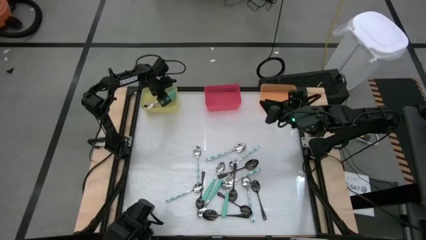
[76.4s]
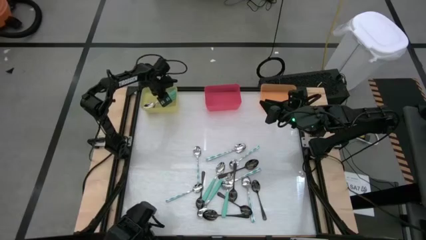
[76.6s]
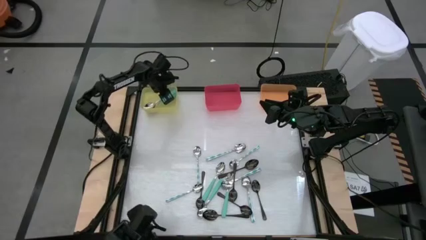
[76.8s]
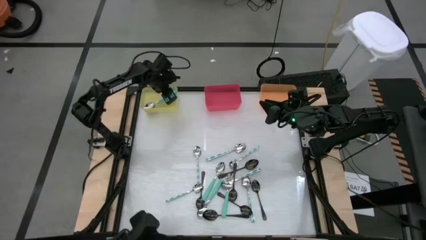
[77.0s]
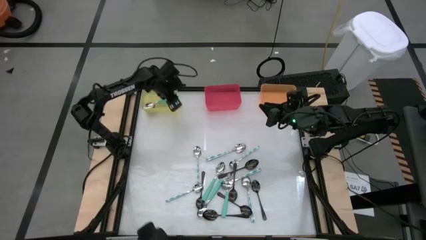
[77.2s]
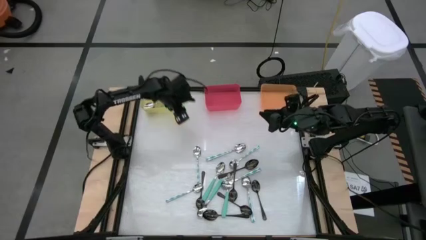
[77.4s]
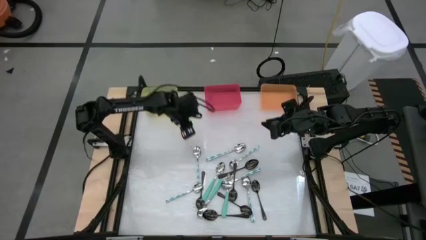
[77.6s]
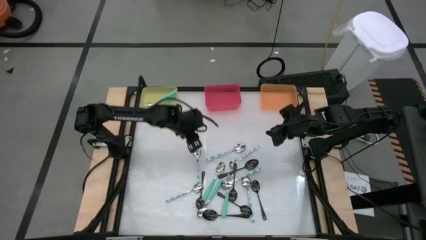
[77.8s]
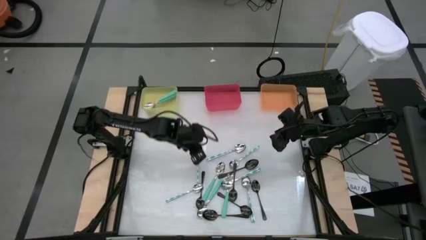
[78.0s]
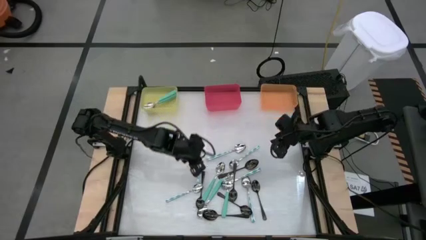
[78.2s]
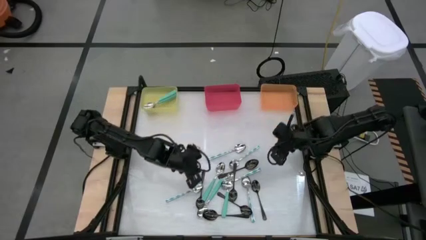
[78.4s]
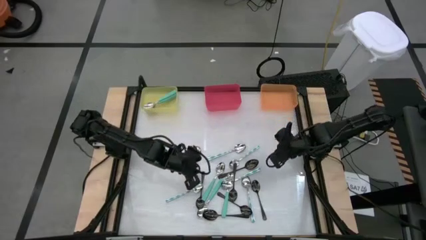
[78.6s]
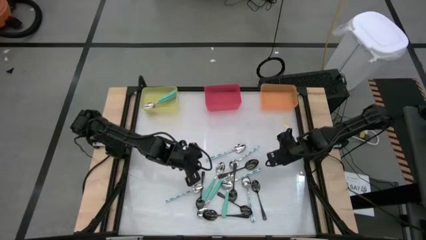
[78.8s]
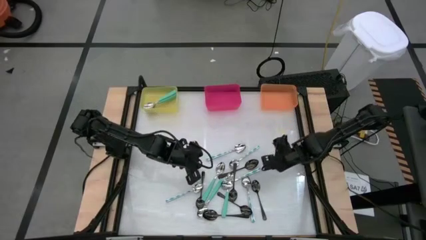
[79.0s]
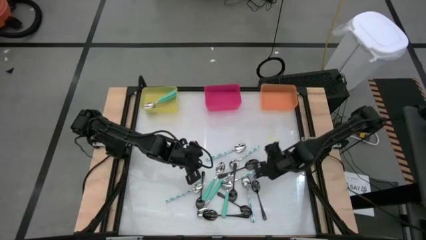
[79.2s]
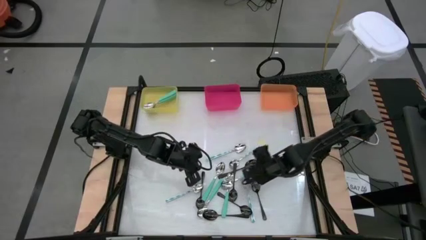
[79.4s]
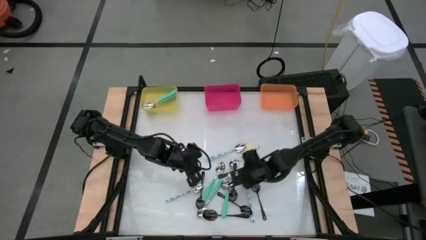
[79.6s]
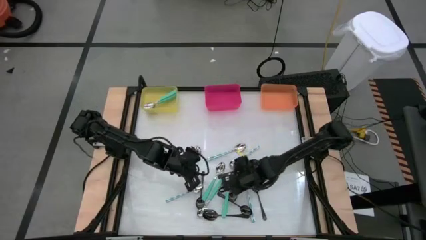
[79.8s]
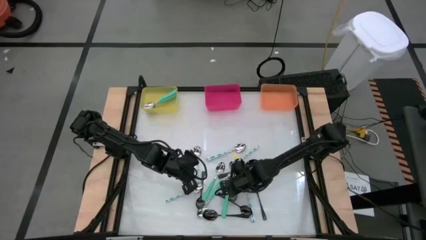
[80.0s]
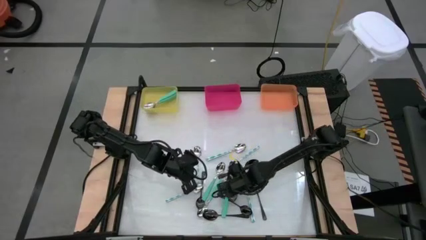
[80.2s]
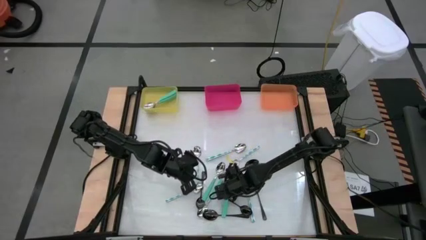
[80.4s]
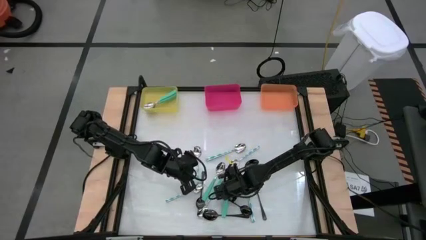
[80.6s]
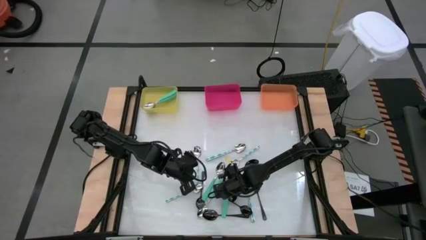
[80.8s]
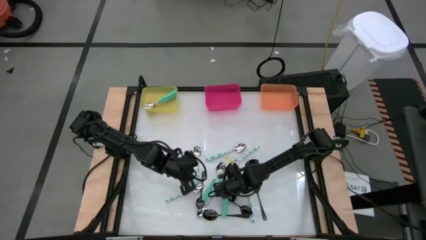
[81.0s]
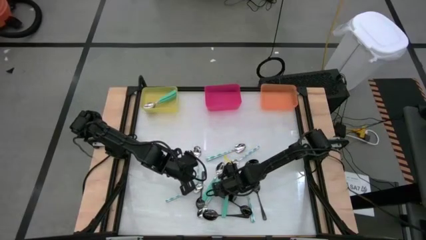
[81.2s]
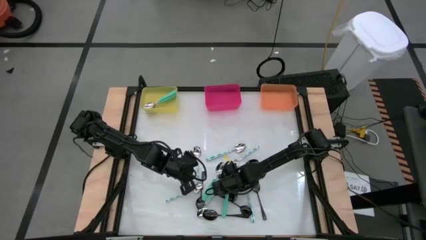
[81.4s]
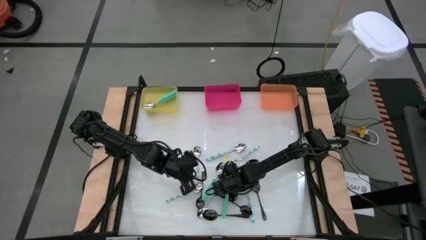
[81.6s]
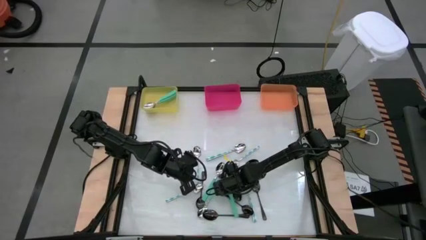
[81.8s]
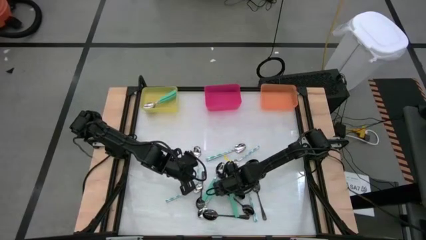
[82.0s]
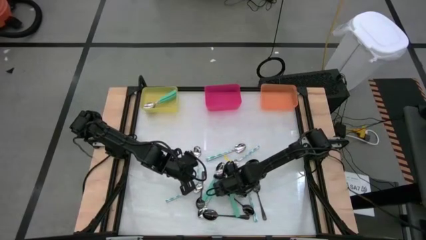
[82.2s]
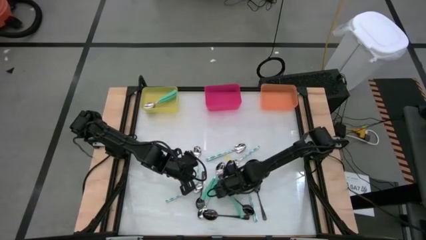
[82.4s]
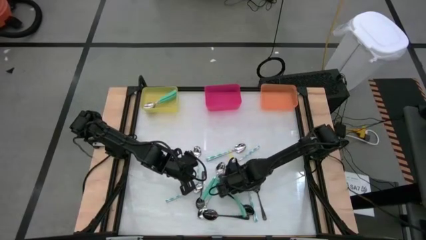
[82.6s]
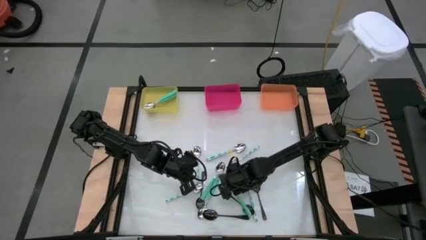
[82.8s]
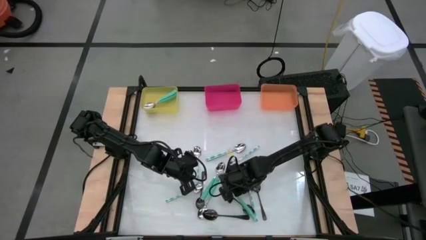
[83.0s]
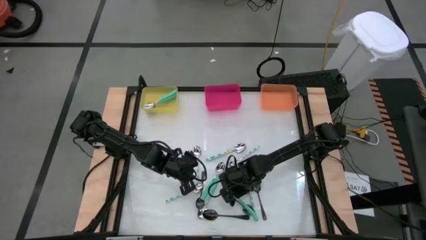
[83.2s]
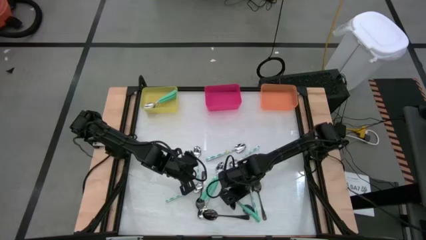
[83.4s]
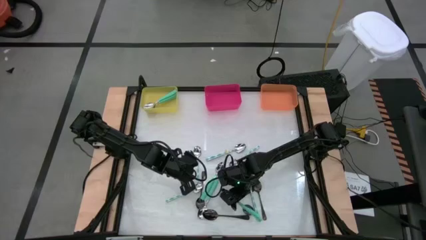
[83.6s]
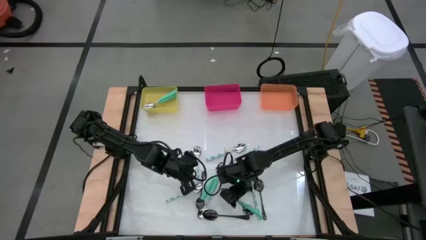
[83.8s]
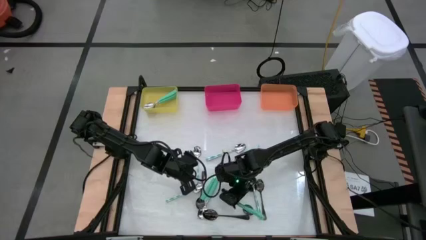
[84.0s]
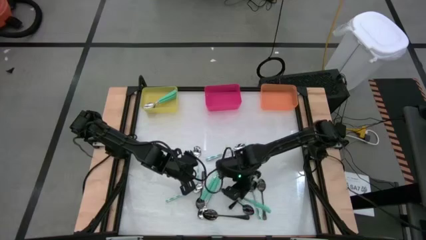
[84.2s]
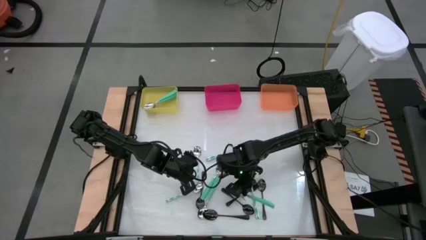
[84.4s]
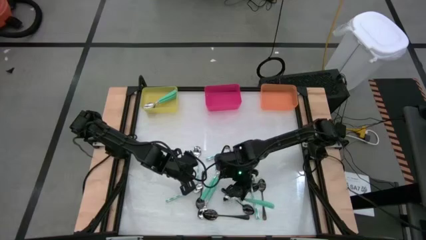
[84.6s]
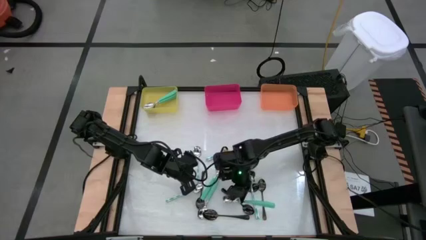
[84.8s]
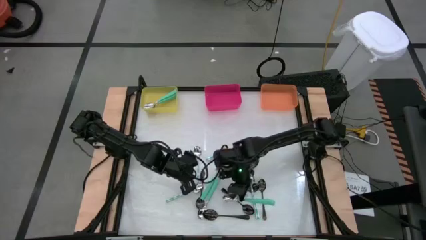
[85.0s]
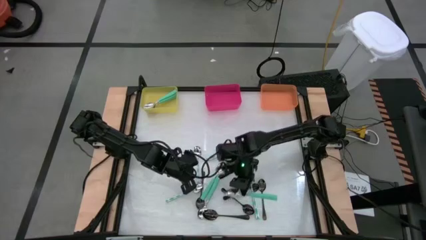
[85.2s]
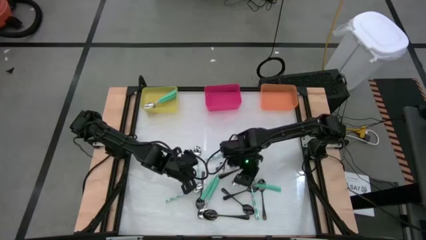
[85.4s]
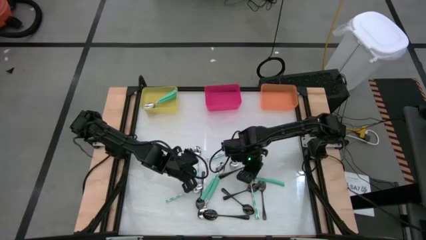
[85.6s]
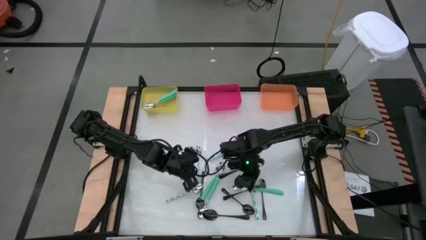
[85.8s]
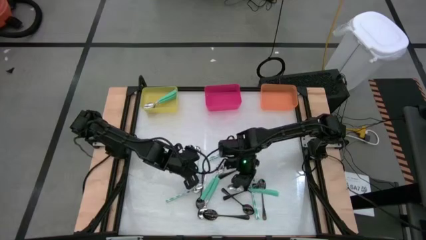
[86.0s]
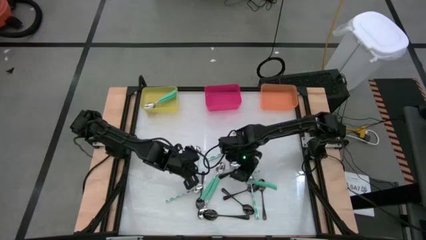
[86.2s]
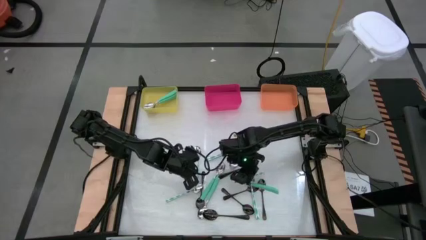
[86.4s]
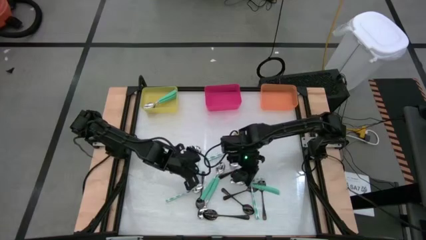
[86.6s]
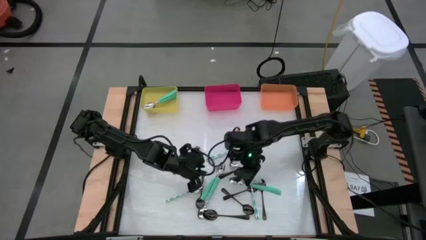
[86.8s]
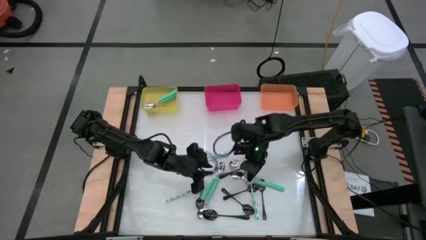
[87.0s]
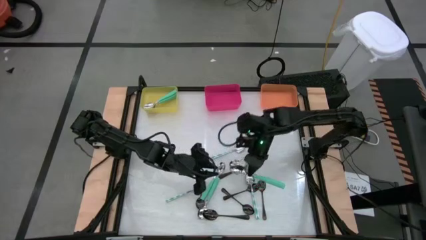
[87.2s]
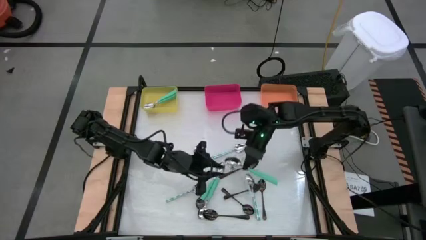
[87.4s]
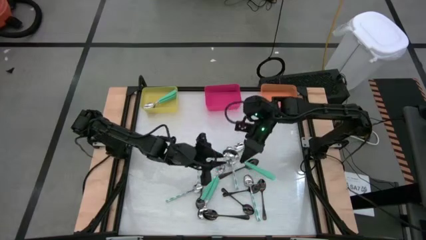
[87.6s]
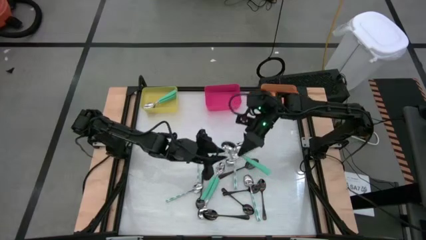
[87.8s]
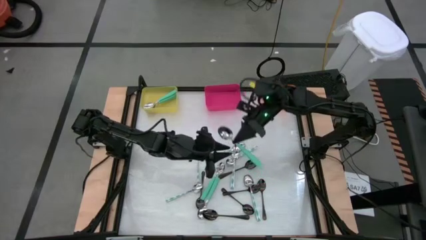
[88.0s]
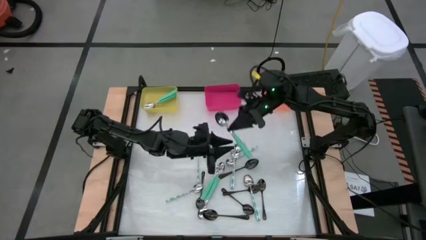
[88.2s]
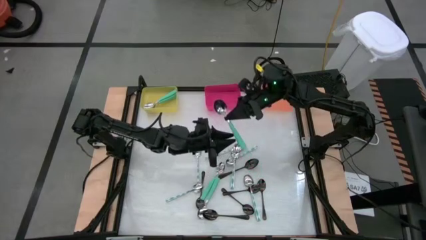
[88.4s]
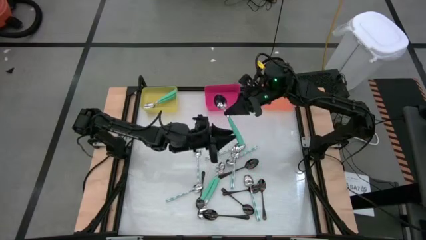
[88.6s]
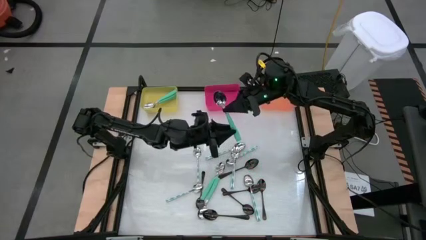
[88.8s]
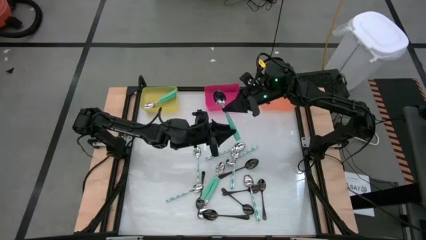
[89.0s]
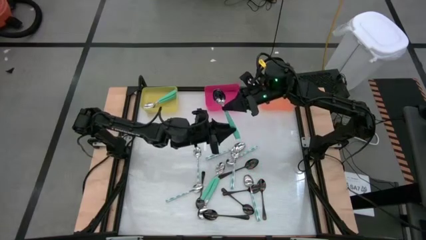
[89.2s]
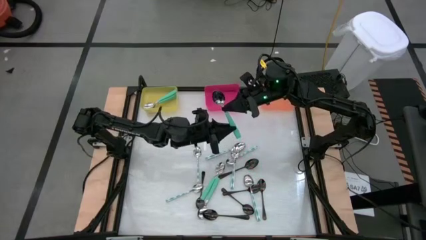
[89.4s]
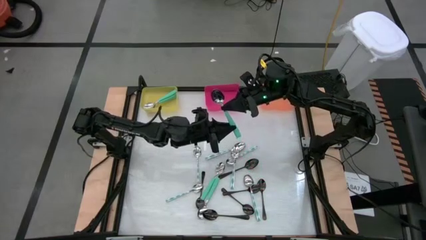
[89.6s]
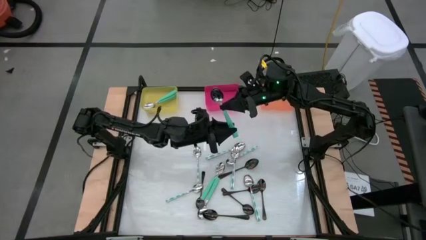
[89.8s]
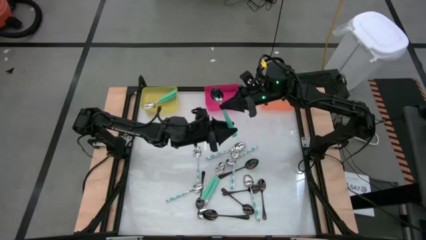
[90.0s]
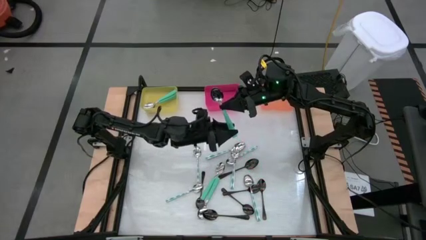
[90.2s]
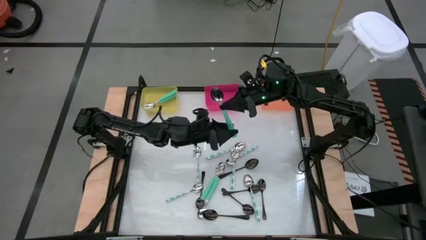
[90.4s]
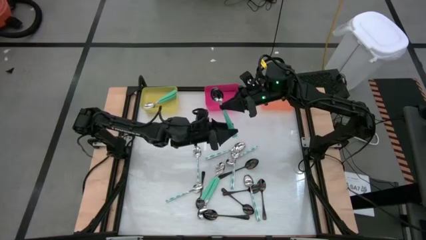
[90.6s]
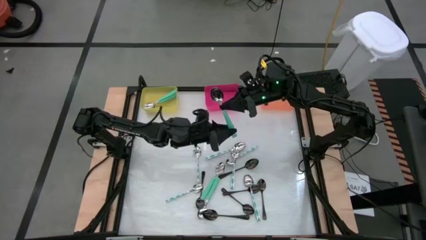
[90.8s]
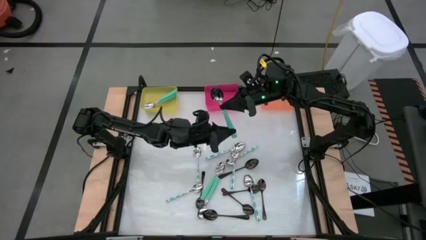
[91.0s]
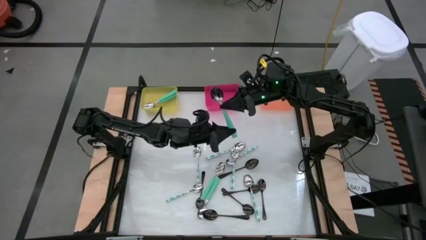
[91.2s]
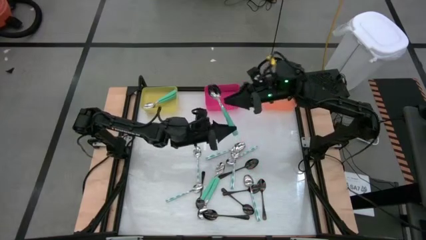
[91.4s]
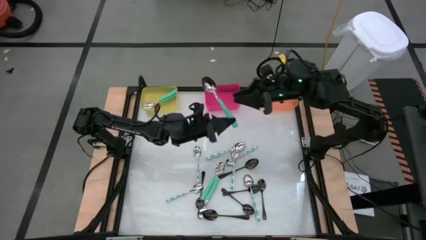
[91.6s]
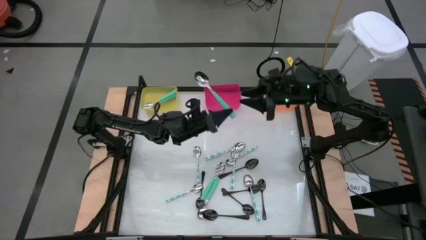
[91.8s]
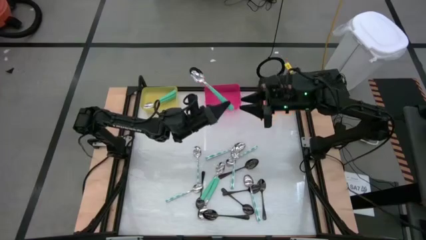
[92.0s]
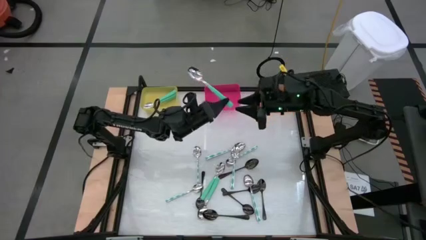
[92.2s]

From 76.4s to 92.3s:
Task: Sort silverware by color (type)
Put the light green spoon into the yellow bin
